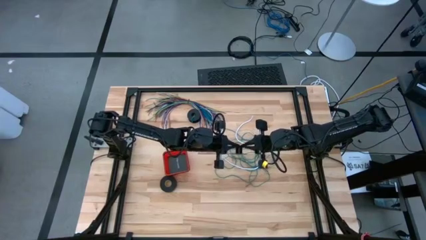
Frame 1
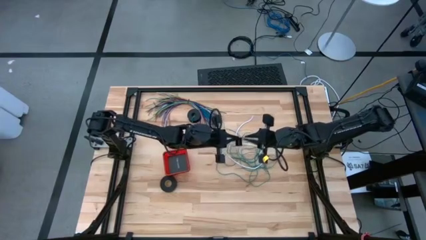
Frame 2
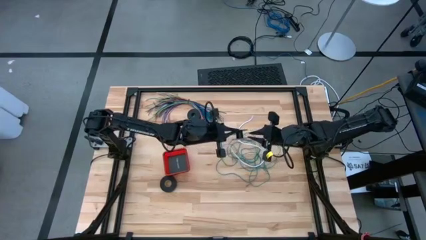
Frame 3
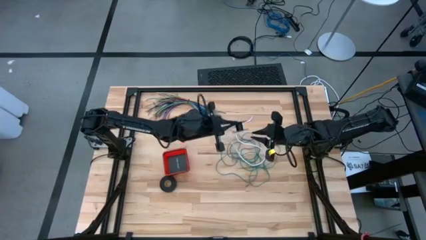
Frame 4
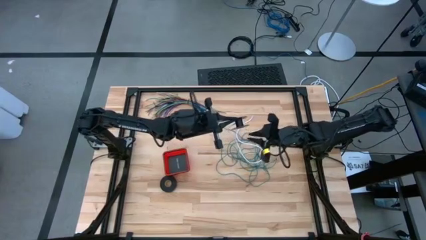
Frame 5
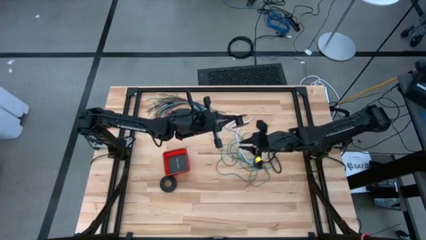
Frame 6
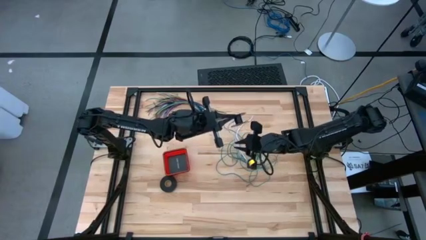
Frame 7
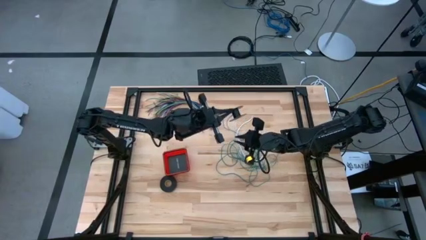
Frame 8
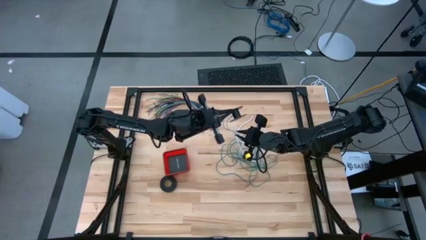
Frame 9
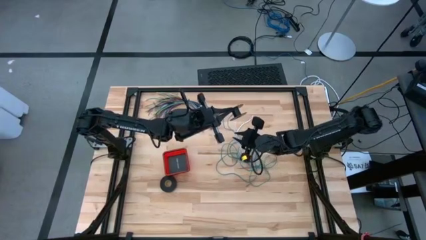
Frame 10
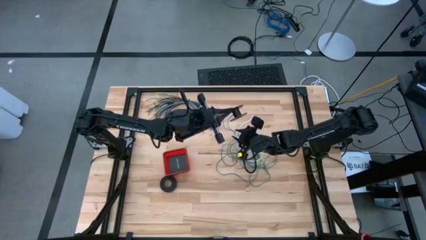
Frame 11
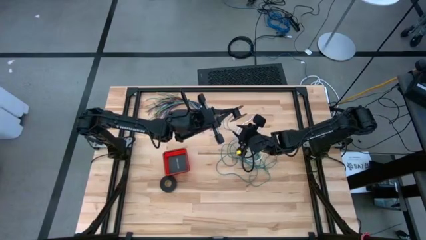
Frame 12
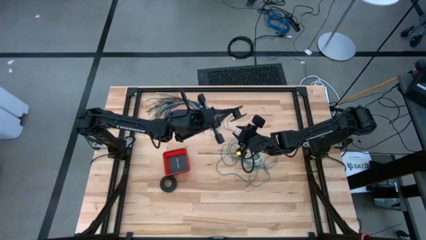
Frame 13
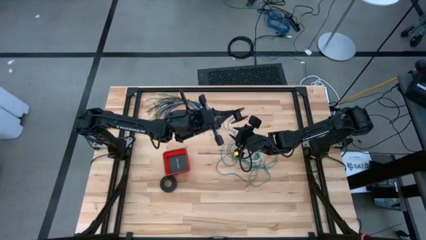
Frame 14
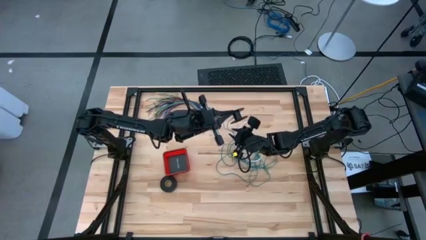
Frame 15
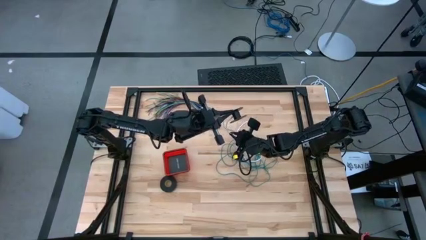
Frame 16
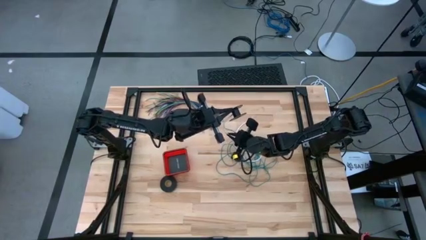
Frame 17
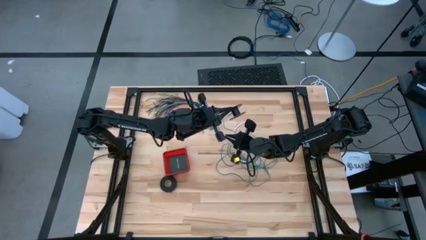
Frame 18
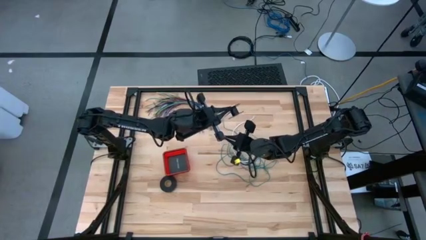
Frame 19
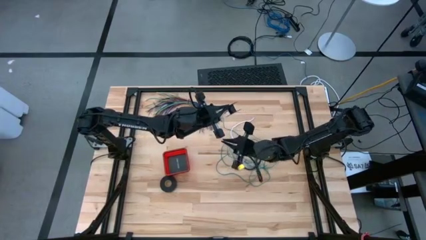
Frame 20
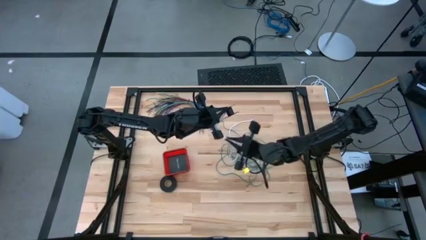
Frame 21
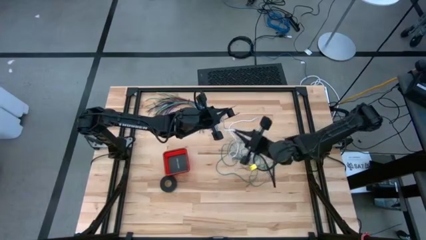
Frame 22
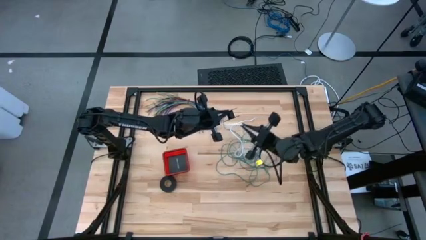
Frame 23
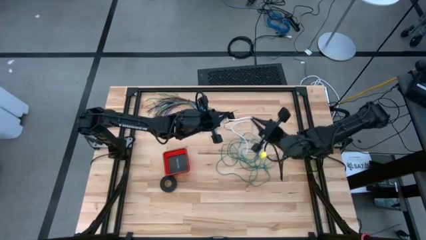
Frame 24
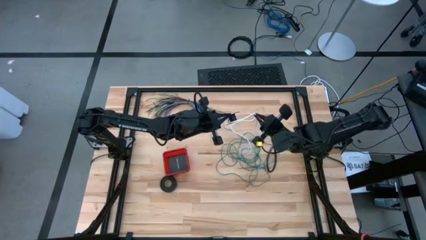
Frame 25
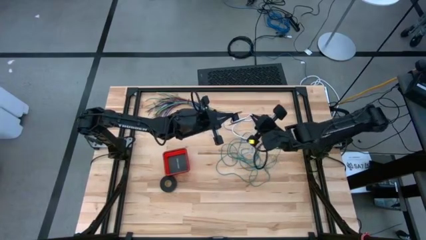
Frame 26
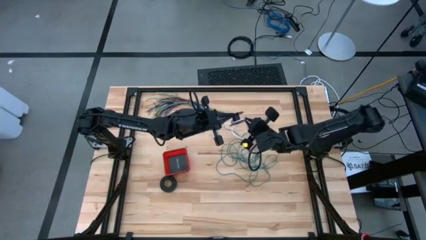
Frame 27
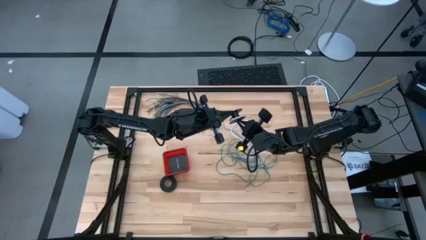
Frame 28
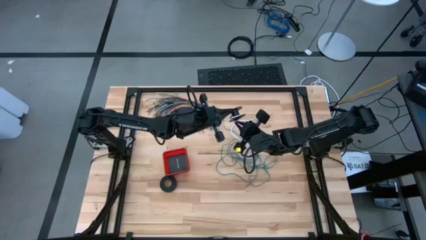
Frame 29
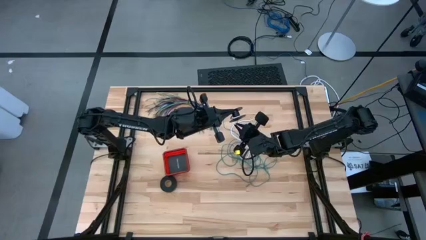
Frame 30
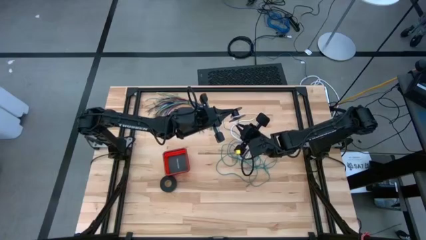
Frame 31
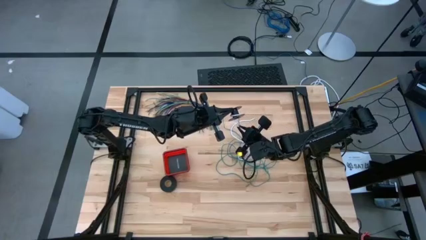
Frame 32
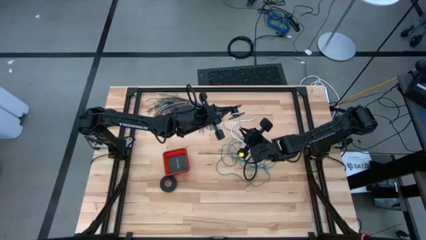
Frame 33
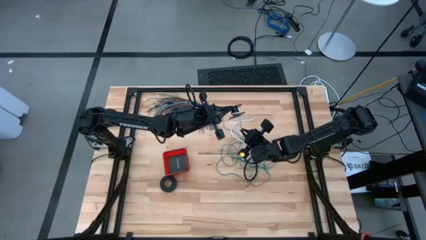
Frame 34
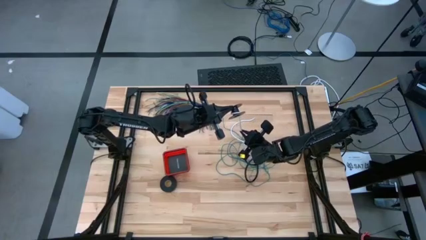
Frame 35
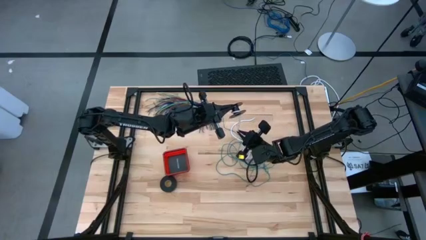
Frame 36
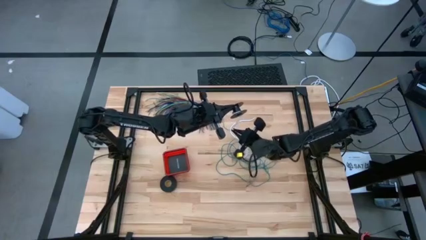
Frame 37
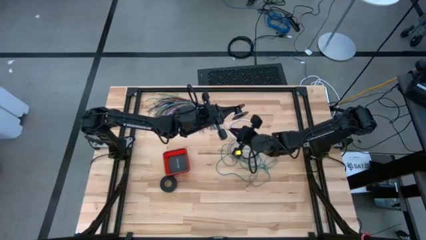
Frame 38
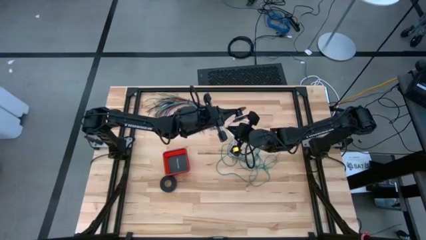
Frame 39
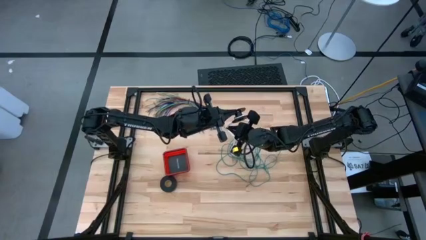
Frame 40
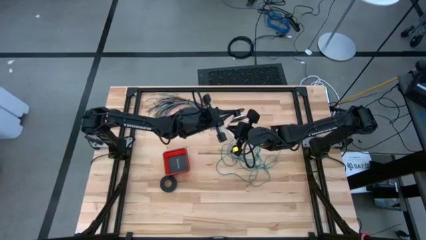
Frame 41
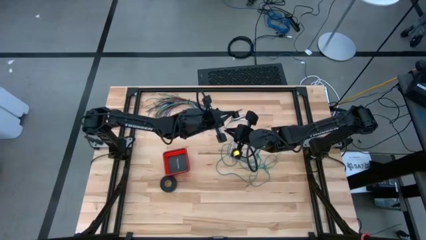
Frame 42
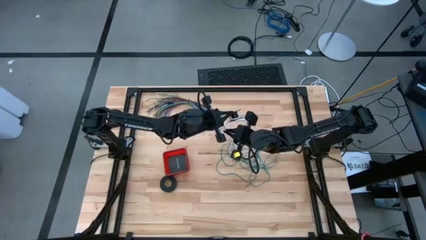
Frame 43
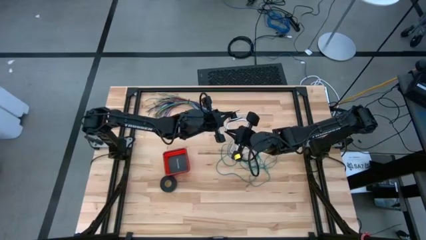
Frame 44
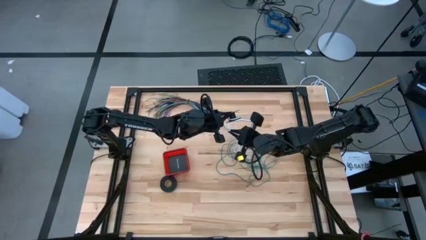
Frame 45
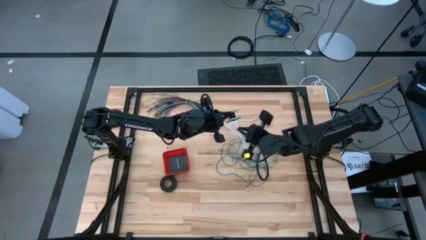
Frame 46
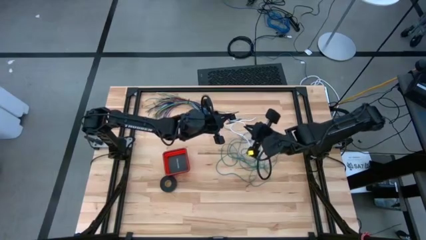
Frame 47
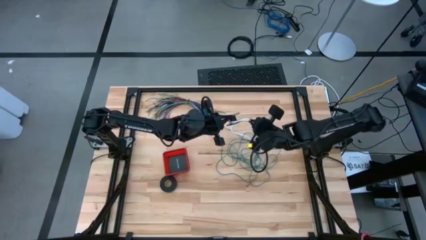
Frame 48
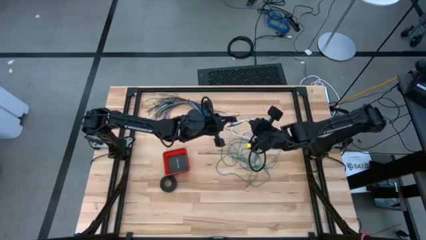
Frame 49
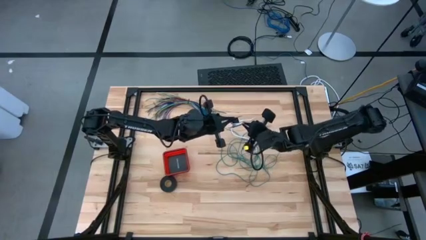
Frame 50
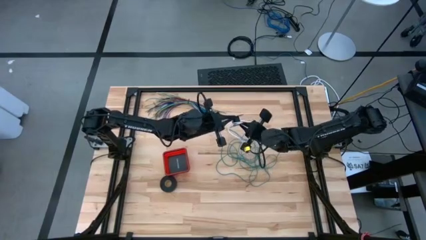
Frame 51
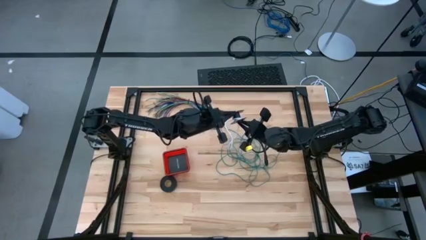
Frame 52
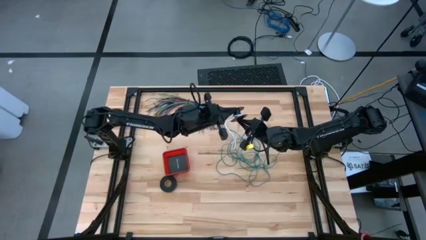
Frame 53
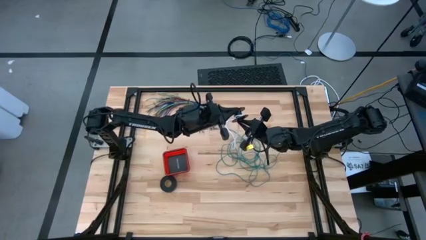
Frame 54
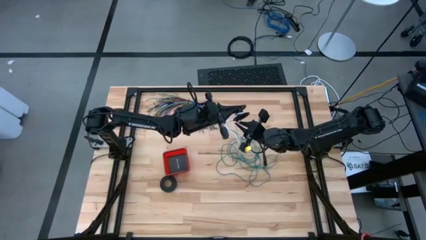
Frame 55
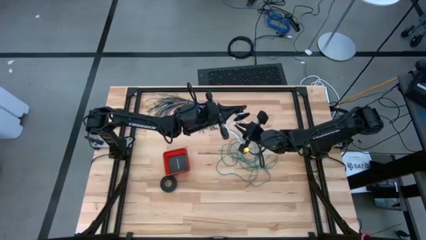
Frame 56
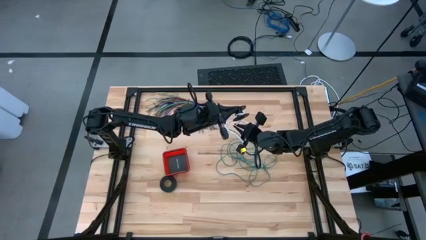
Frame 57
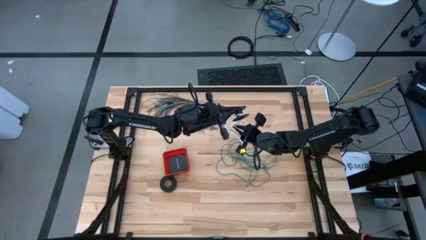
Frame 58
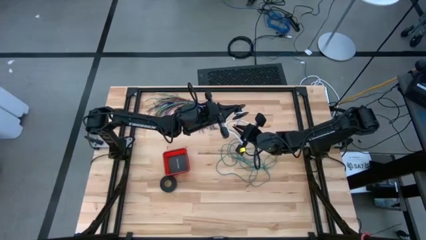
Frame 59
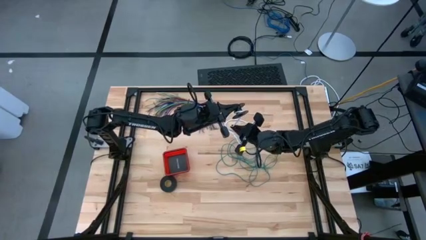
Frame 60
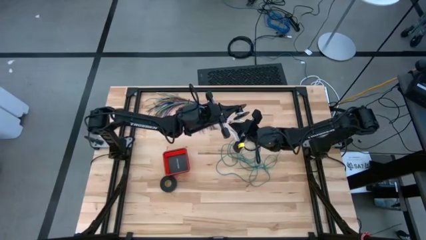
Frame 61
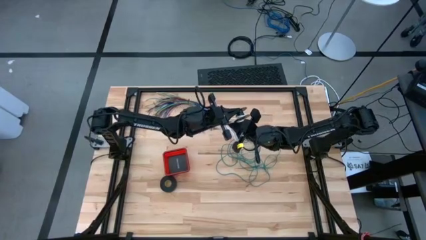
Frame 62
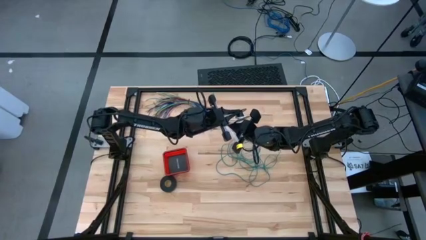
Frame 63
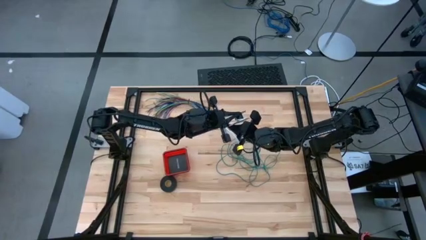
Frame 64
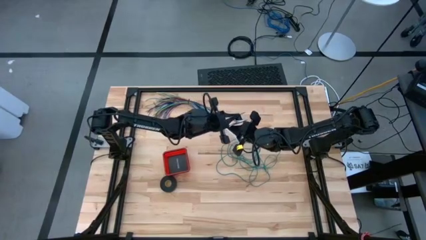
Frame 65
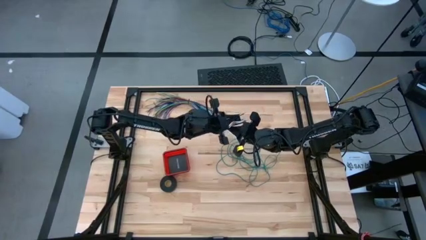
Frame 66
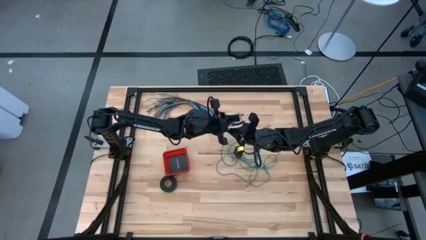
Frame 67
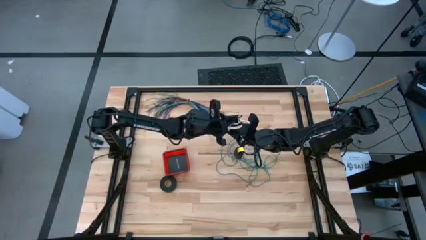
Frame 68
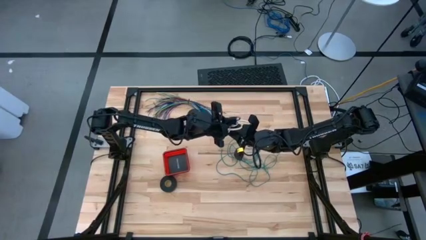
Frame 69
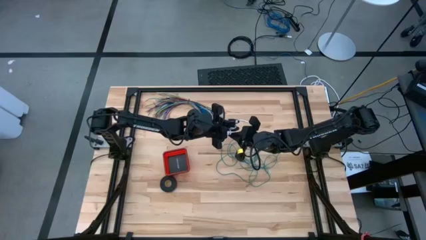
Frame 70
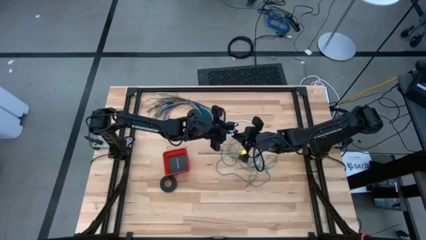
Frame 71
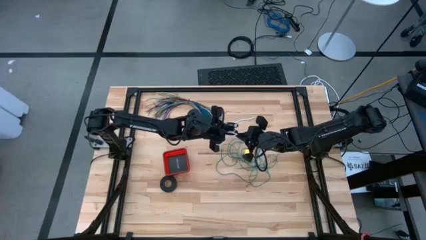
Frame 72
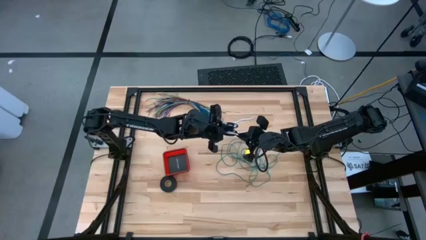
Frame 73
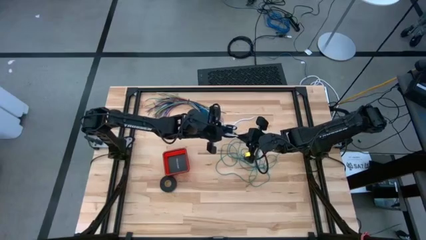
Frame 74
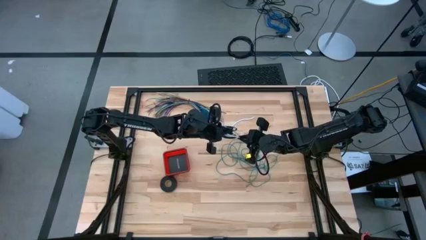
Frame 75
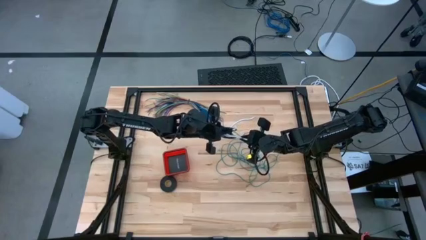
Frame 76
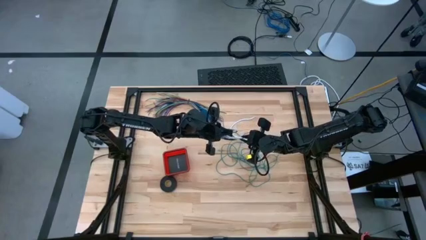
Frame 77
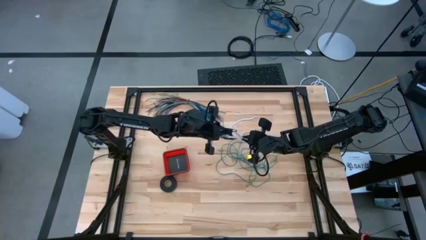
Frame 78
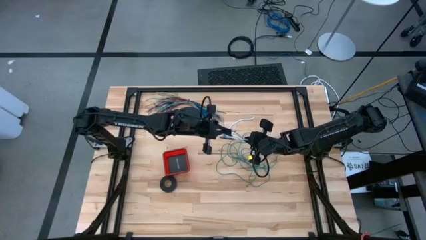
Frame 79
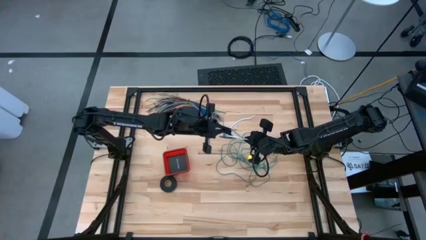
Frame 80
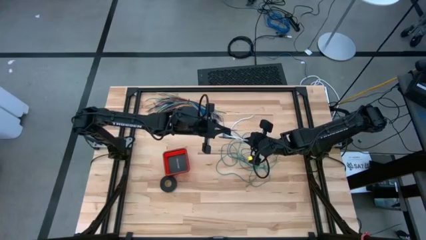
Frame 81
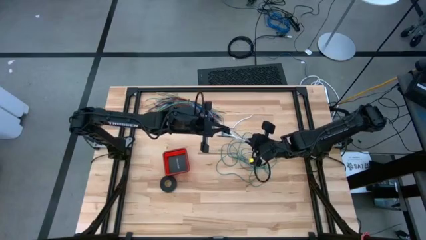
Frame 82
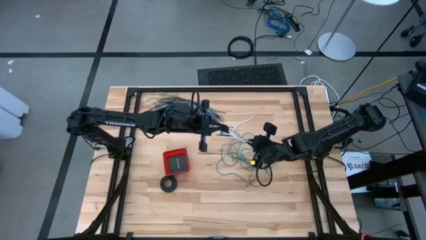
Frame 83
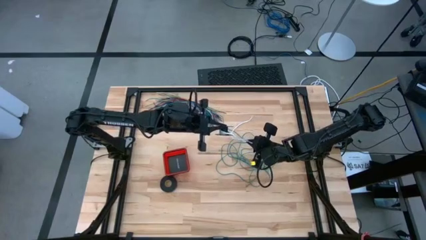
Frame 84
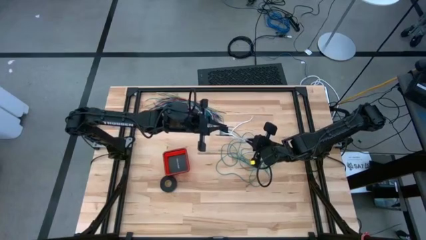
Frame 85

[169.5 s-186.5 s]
Task: Coil cords
Coil the white wire onto the spool
